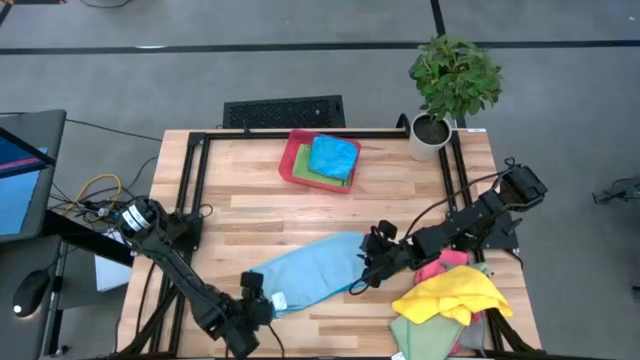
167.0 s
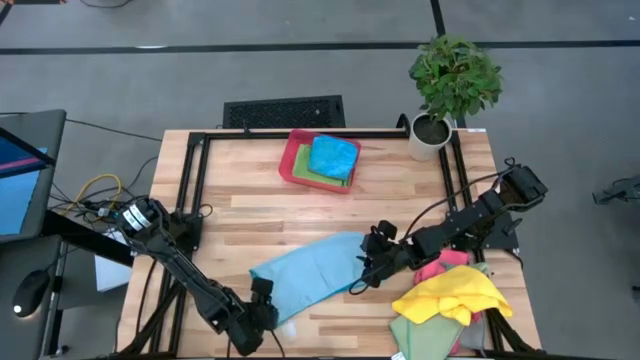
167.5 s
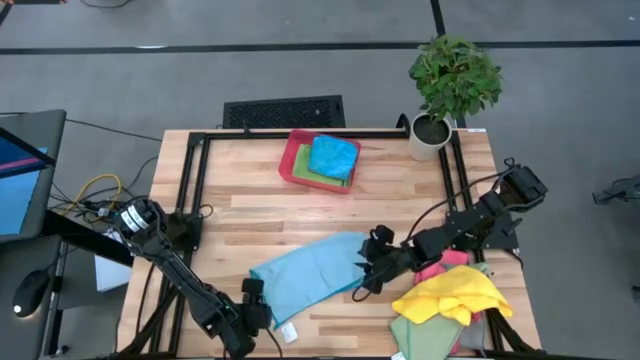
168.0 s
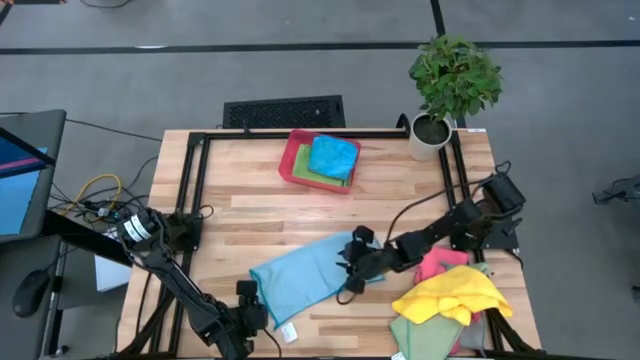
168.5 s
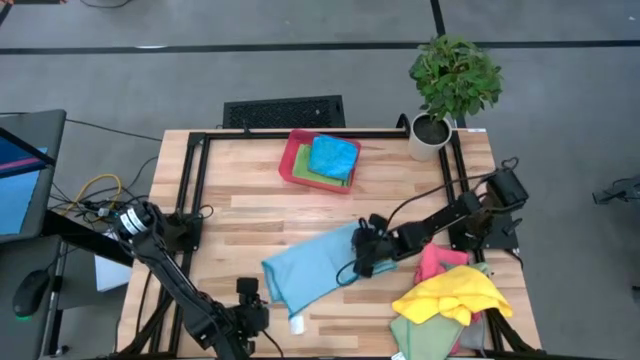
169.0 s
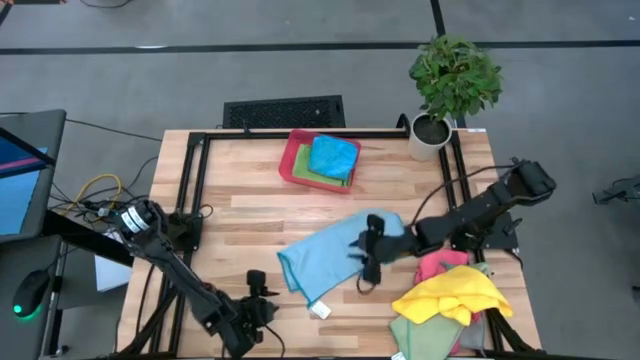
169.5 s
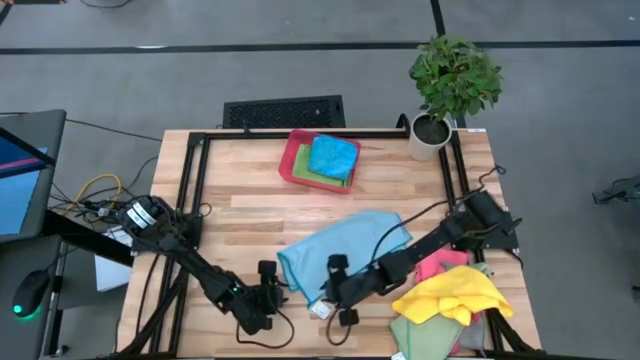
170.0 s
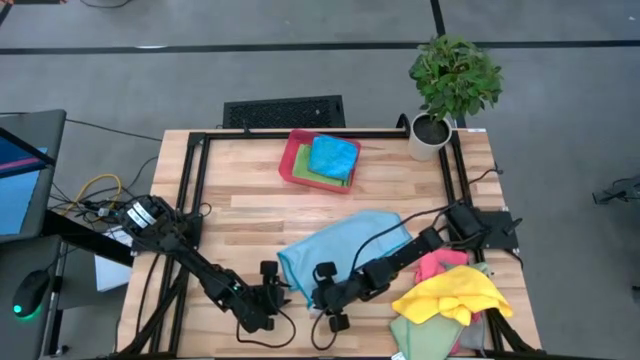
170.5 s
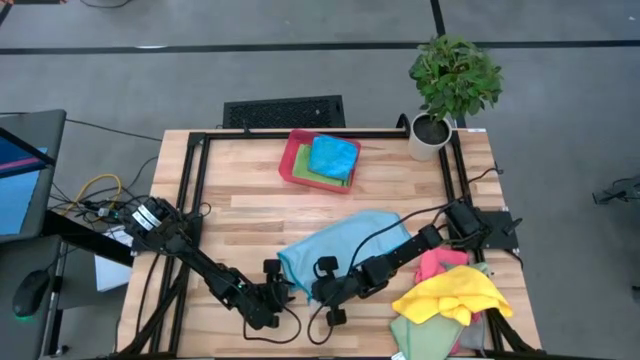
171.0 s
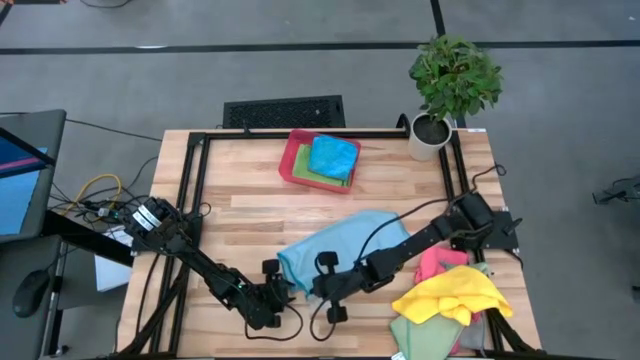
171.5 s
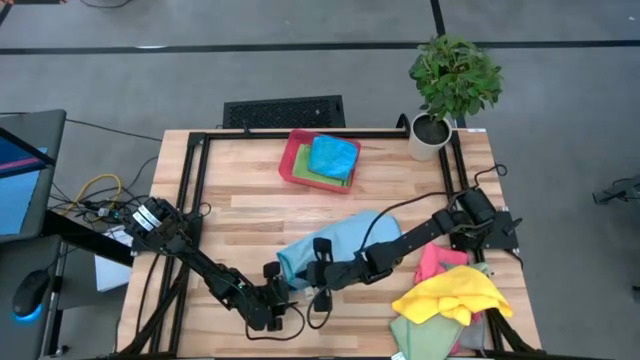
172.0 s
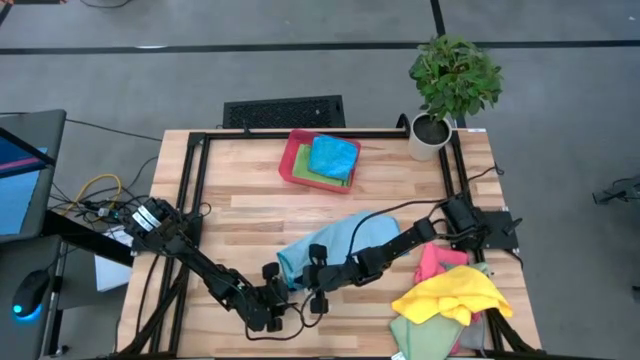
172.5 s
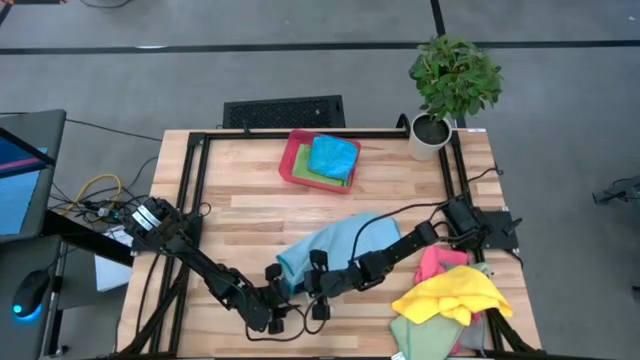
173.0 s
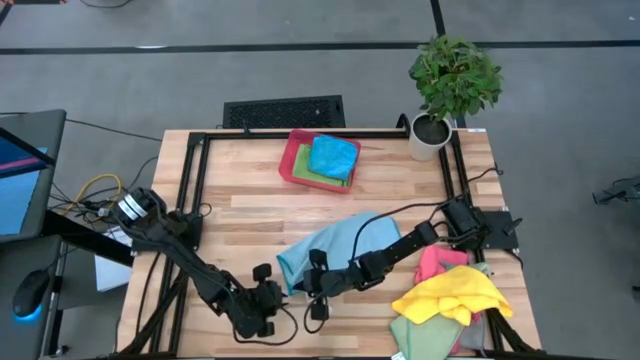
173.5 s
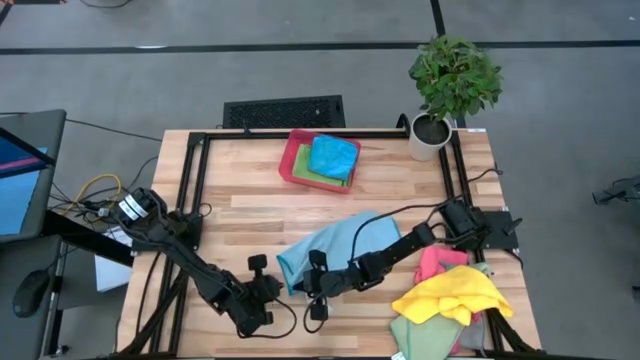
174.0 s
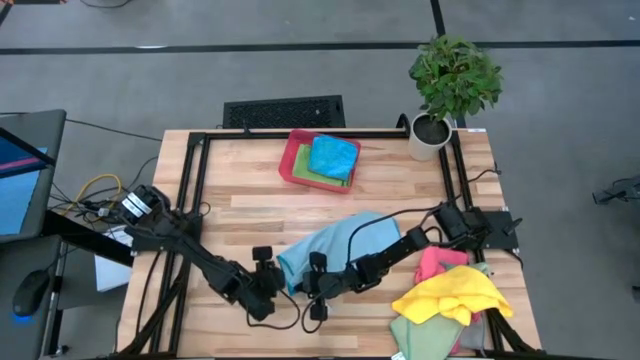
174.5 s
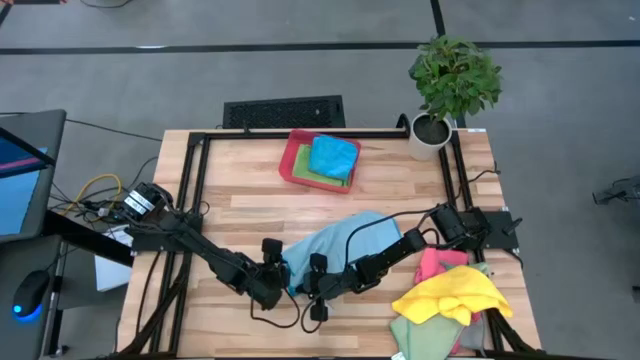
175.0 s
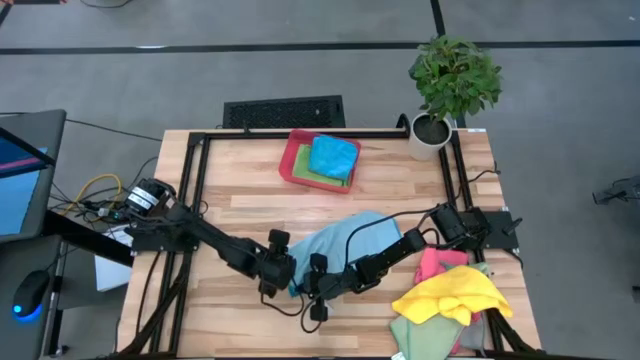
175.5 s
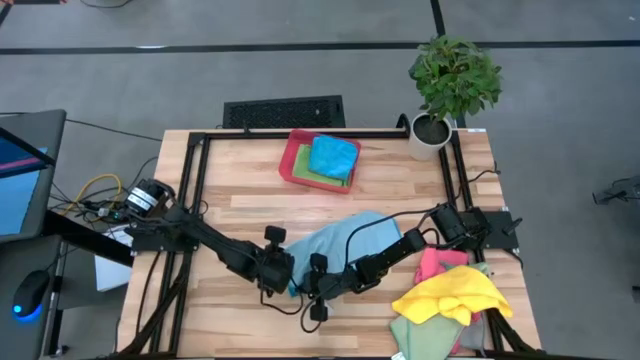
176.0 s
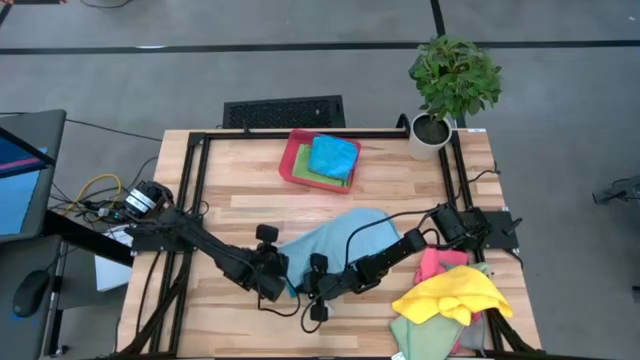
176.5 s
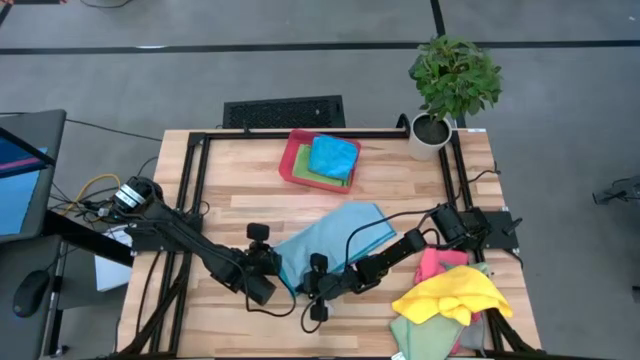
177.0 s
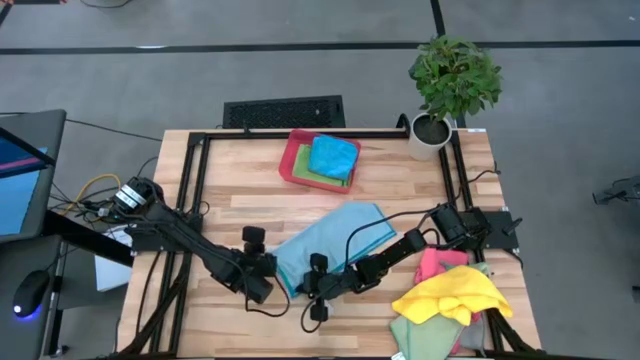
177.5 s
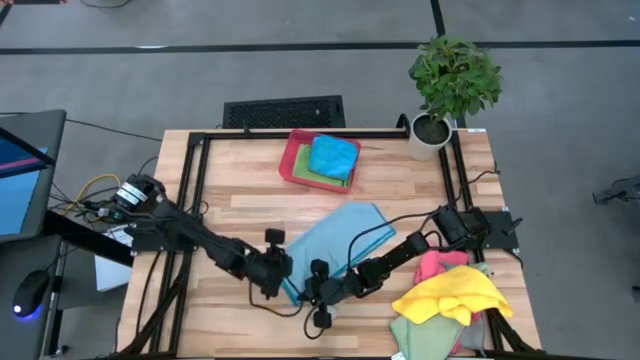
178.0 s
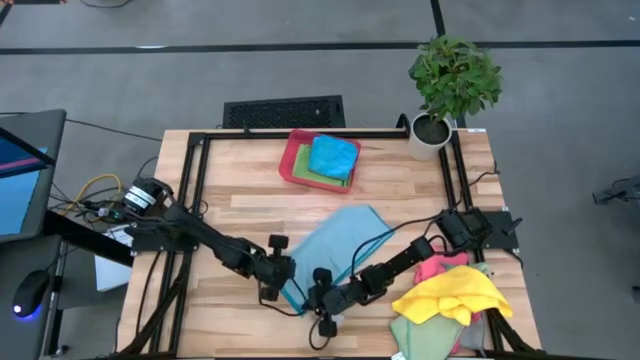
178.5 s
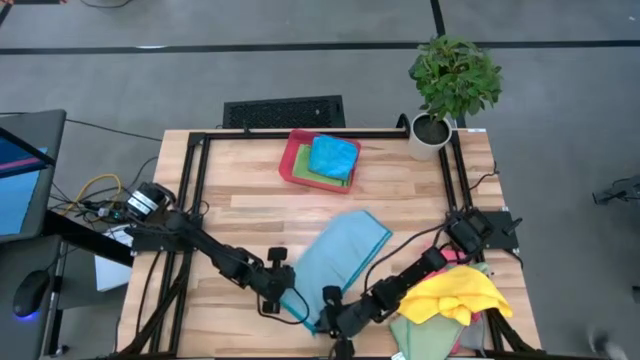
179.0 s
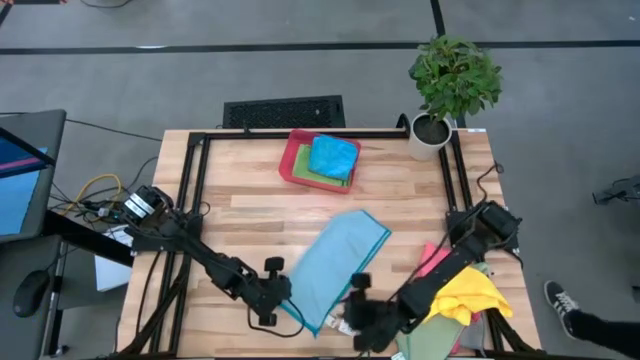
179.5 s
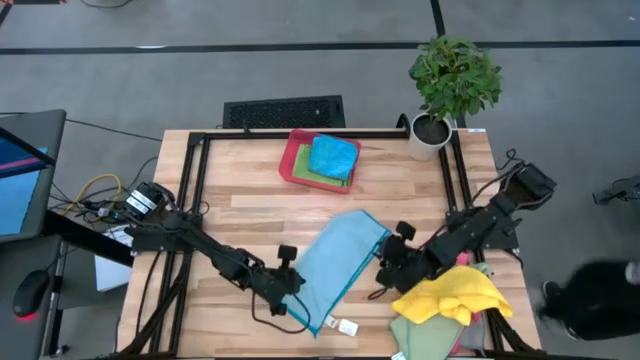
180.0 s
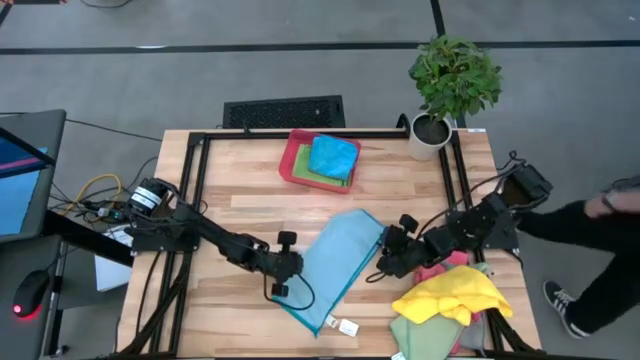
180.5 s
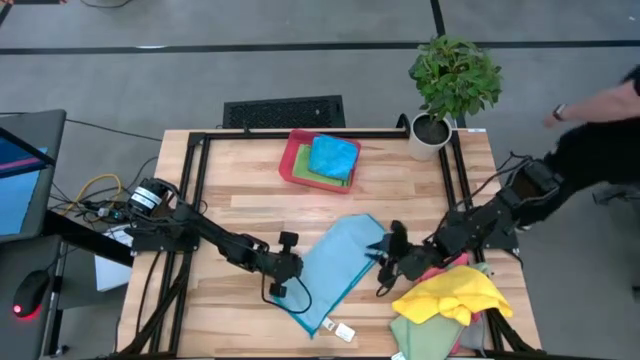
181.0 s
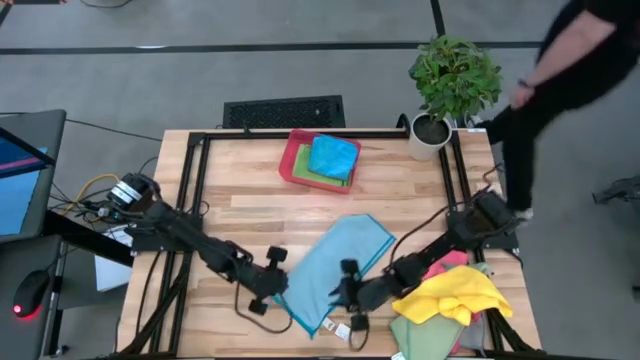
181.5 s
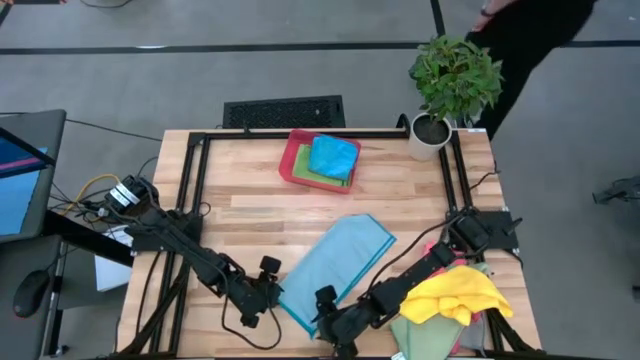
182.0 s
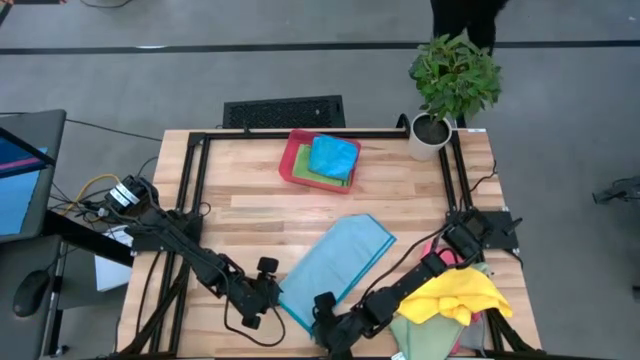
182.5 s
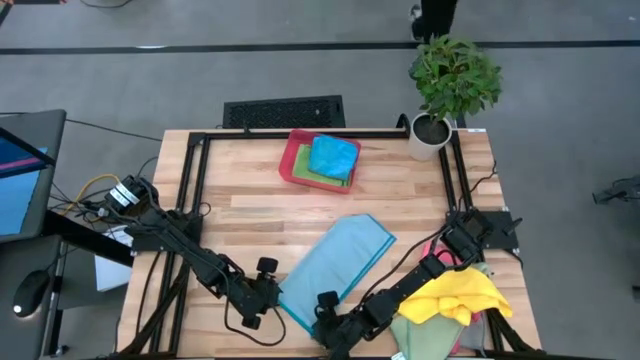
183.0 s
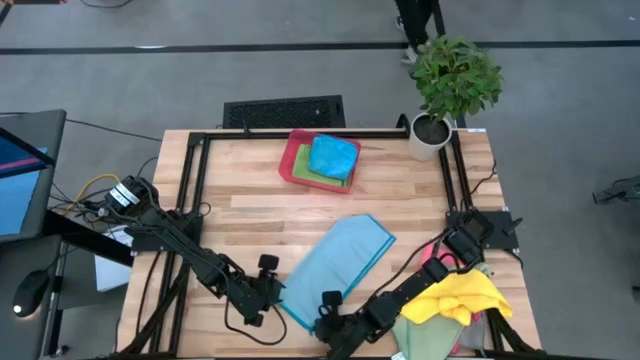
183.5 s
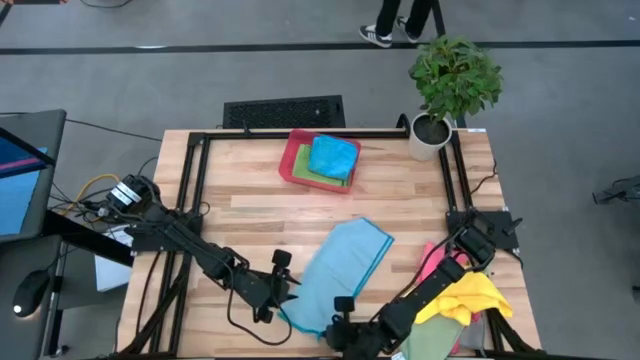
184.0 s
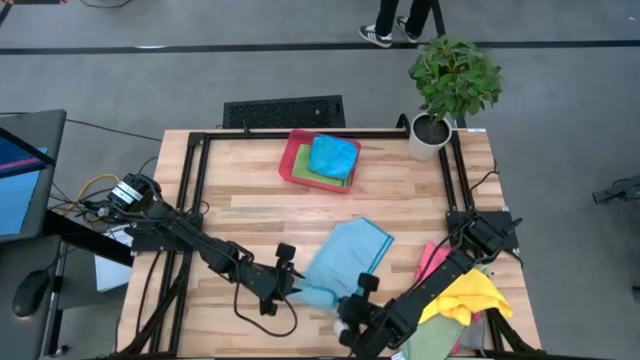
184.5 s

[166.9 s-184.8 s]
Task: Fold microfiber towels
Fold the light blue microfiber cloth

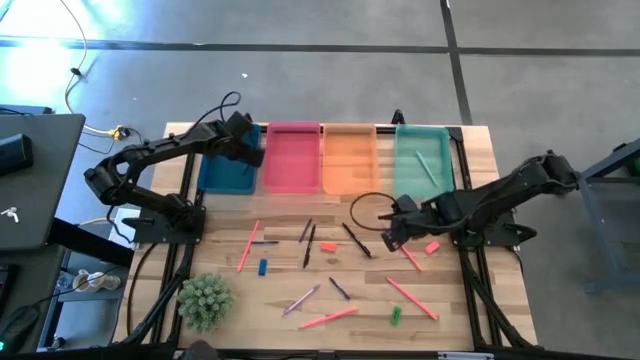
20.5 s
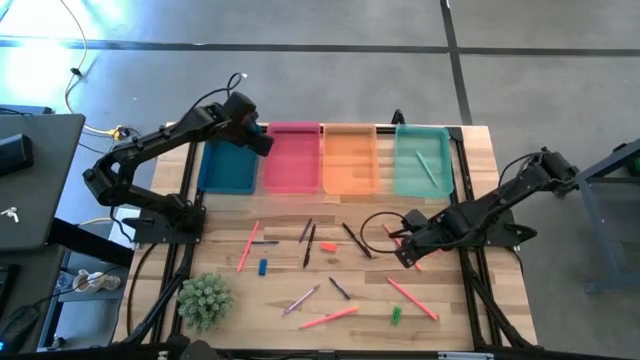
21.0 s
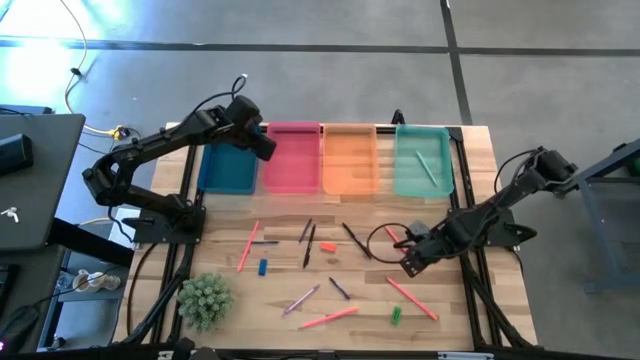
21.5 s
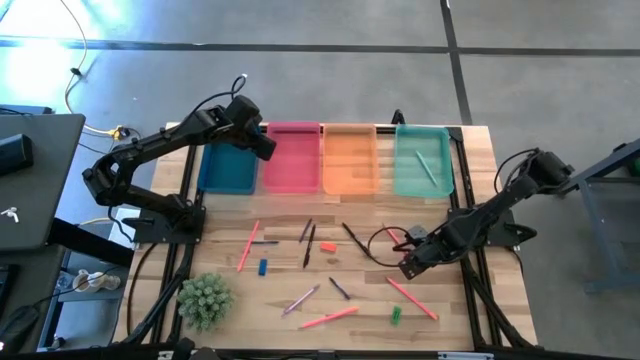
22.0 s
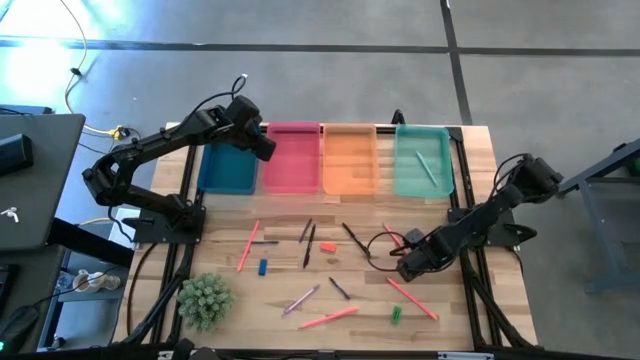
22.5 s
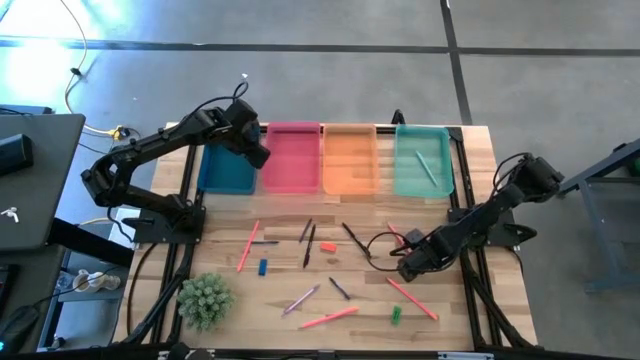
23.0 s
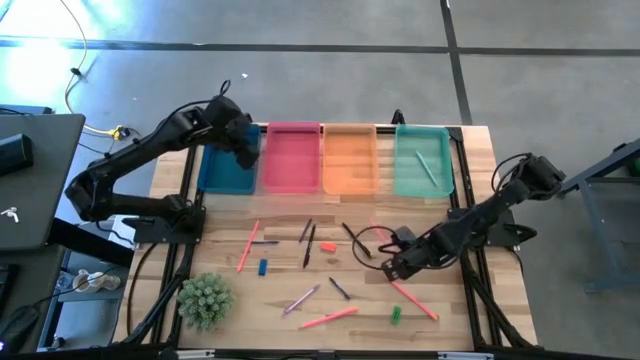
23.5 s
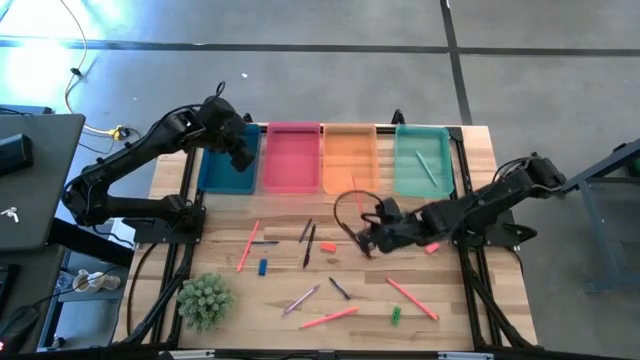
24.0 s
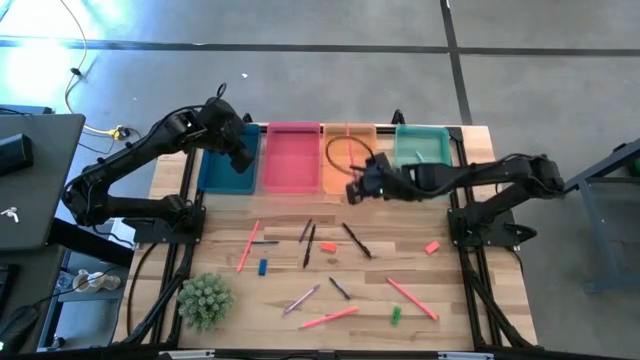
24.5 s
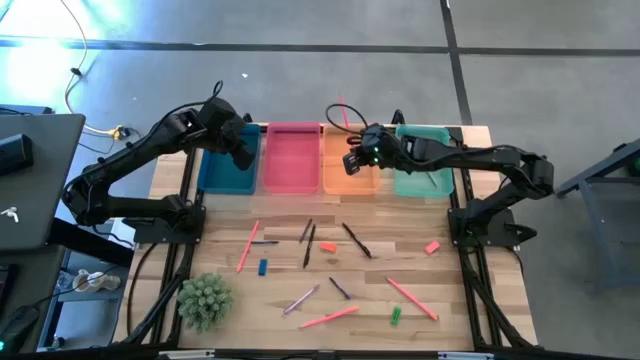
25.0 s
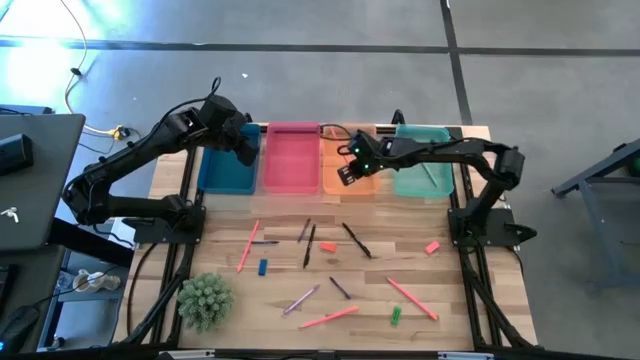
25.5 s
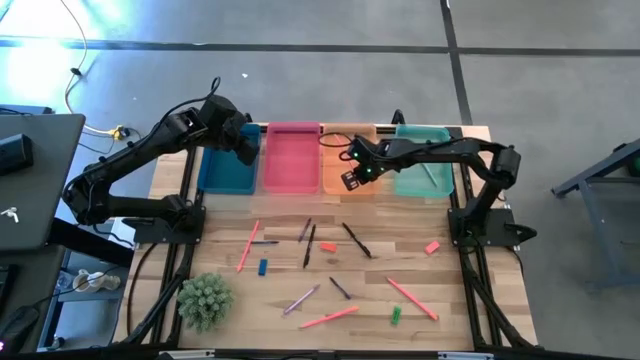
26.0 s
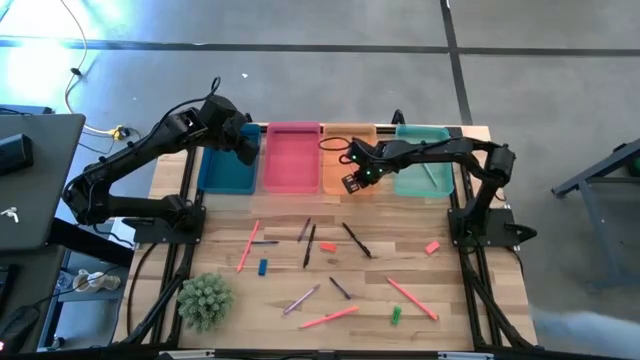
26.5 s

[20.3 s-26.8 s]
Task: Sort crayons/erasers/pens/pencils in bins
Put the pink pencil into the orange bin
